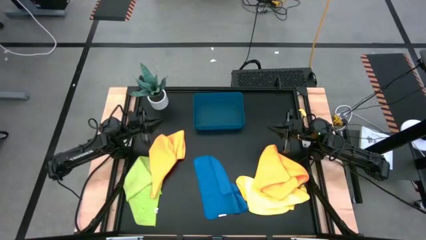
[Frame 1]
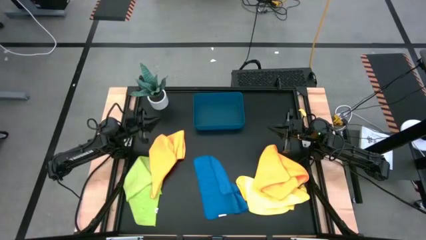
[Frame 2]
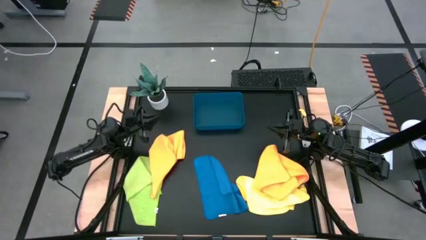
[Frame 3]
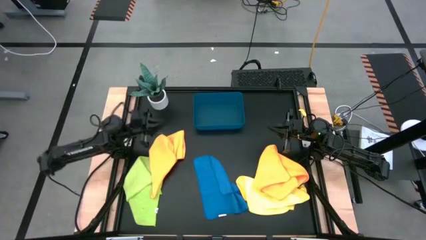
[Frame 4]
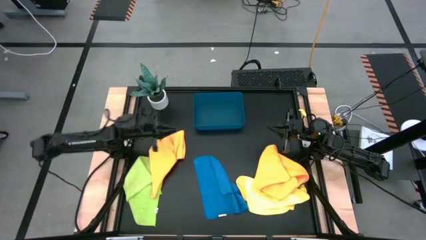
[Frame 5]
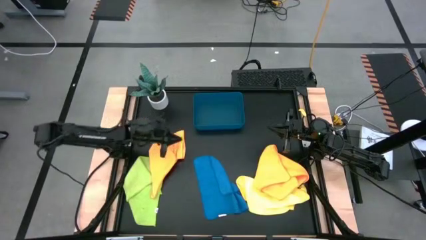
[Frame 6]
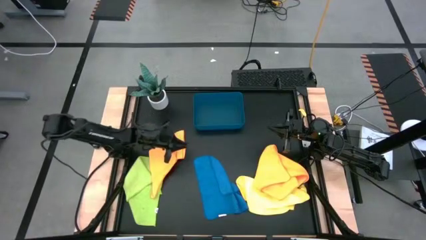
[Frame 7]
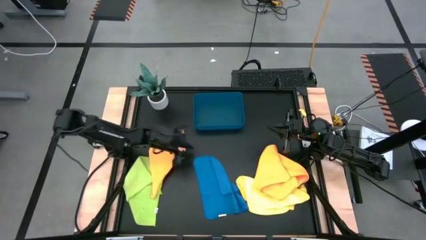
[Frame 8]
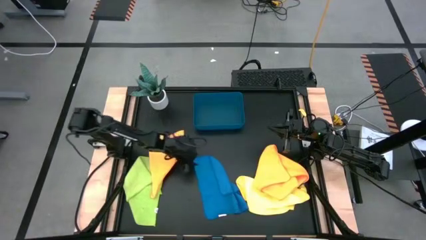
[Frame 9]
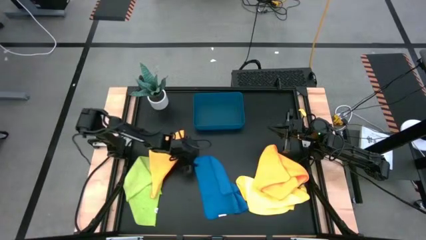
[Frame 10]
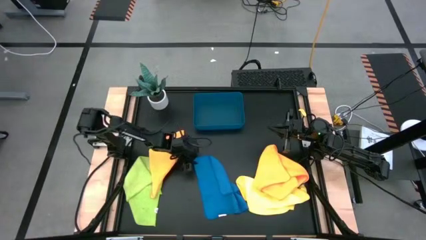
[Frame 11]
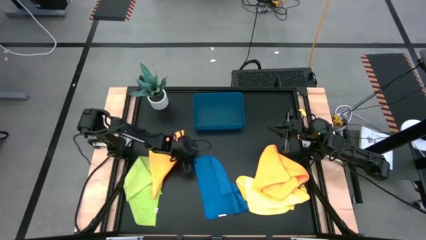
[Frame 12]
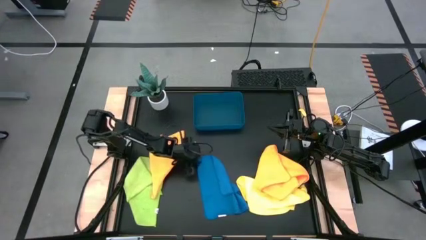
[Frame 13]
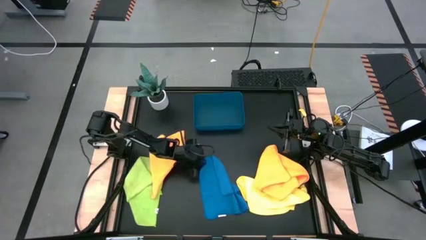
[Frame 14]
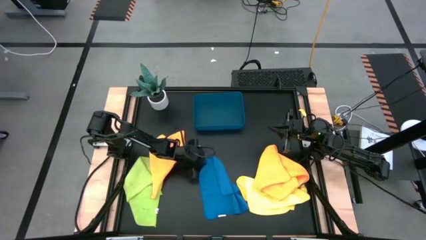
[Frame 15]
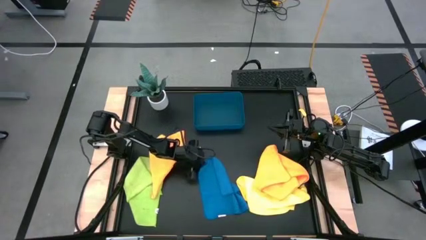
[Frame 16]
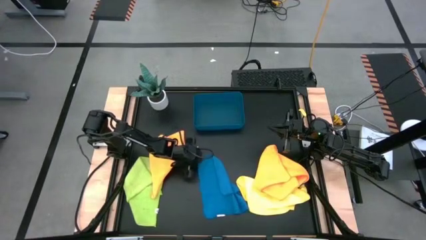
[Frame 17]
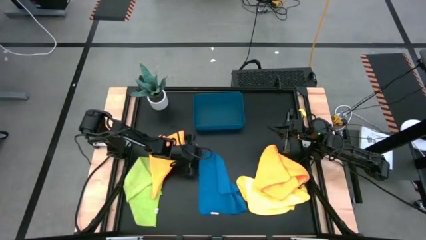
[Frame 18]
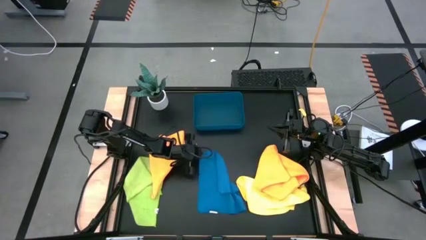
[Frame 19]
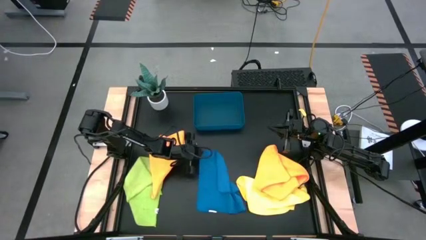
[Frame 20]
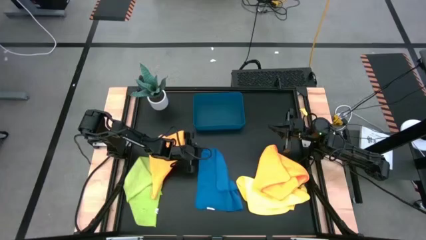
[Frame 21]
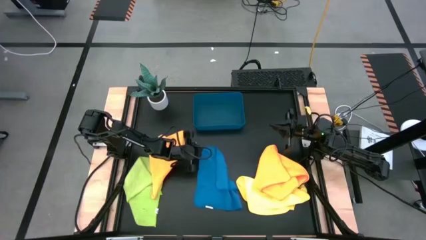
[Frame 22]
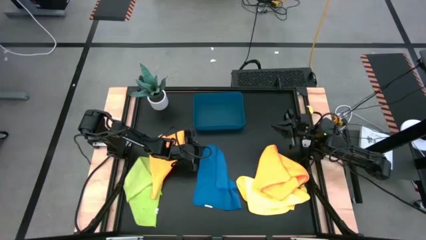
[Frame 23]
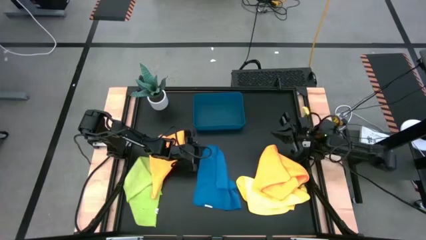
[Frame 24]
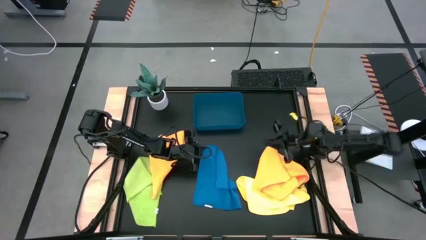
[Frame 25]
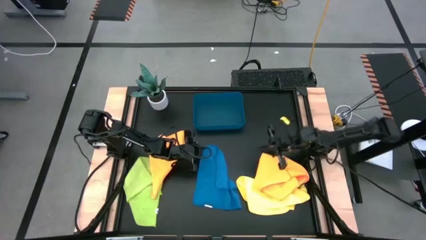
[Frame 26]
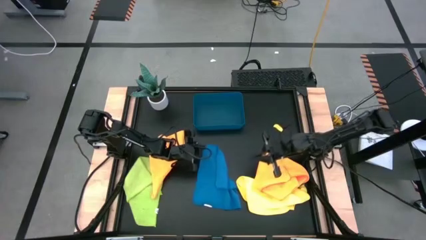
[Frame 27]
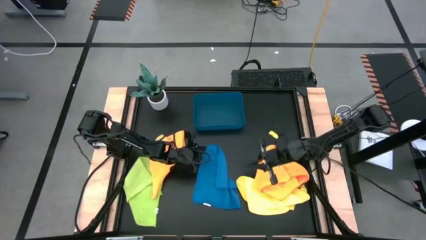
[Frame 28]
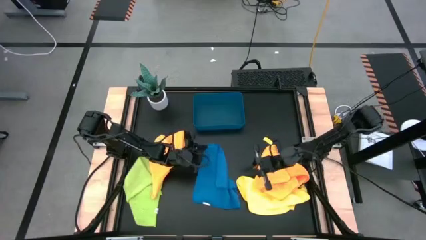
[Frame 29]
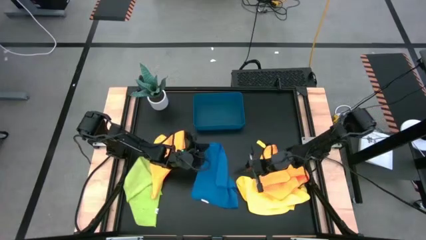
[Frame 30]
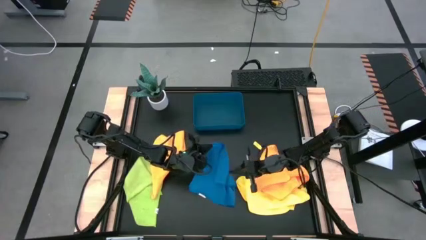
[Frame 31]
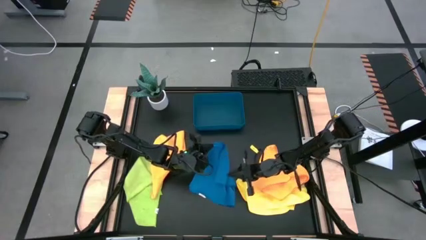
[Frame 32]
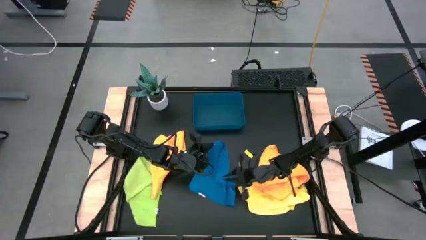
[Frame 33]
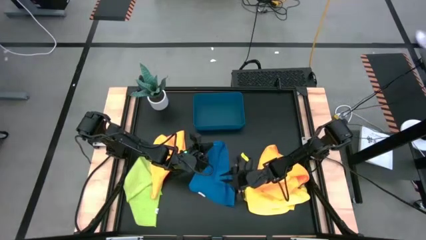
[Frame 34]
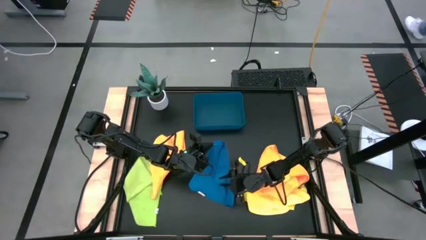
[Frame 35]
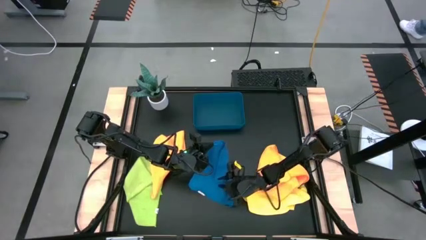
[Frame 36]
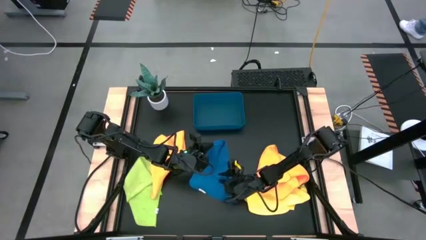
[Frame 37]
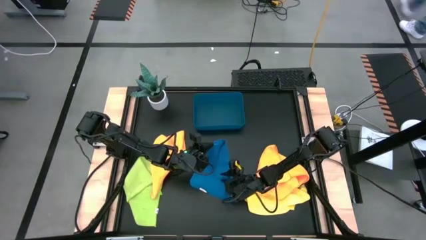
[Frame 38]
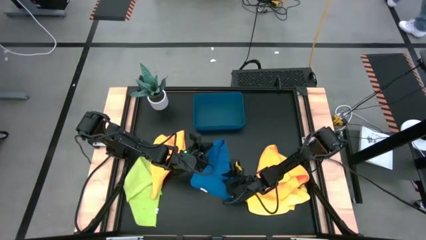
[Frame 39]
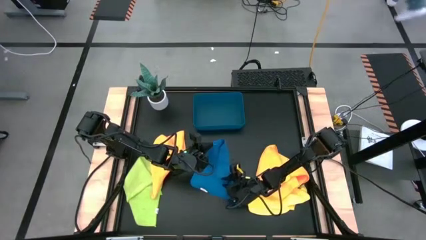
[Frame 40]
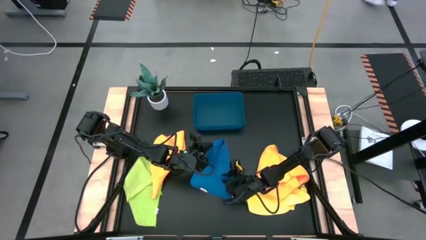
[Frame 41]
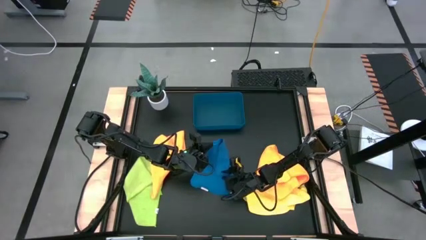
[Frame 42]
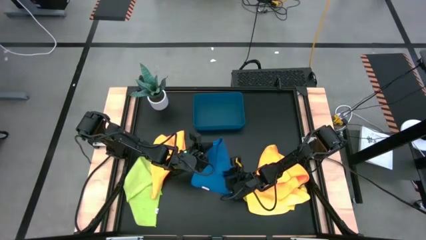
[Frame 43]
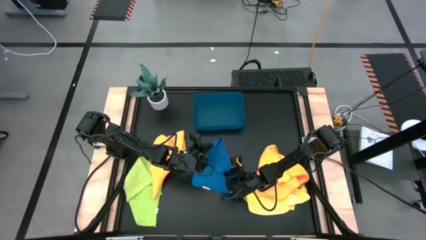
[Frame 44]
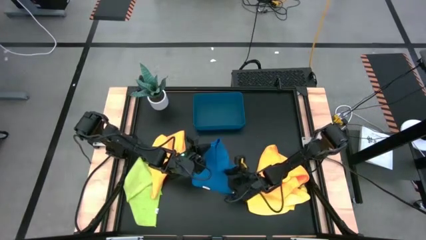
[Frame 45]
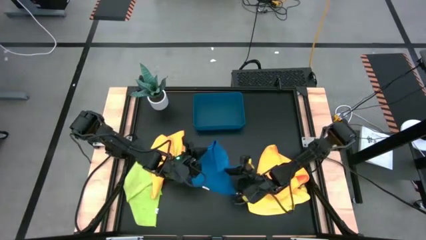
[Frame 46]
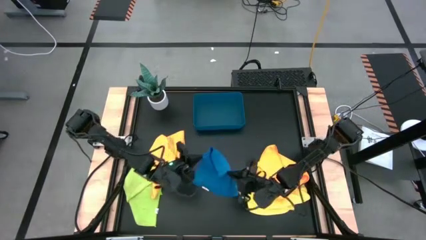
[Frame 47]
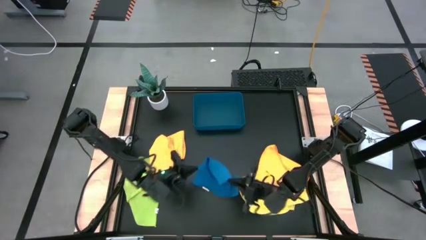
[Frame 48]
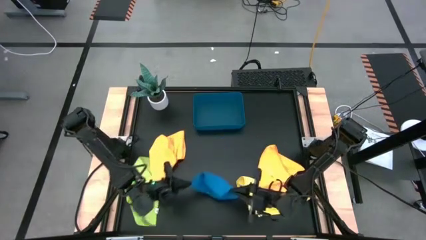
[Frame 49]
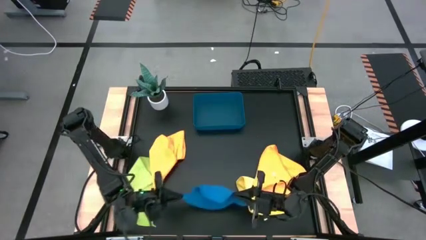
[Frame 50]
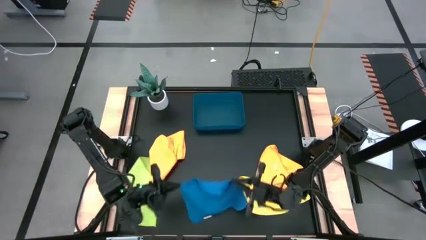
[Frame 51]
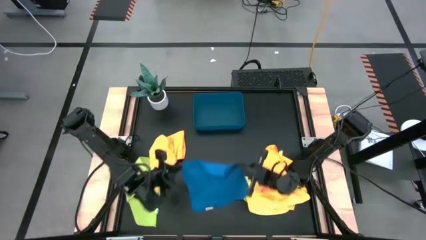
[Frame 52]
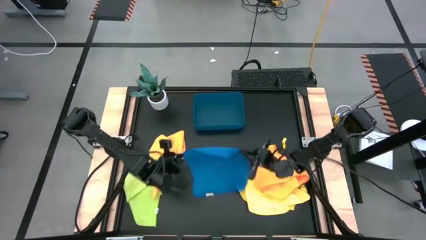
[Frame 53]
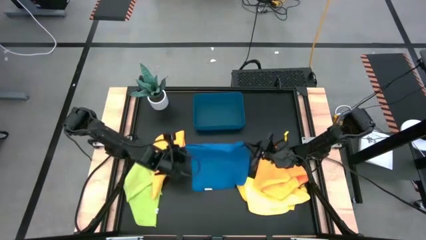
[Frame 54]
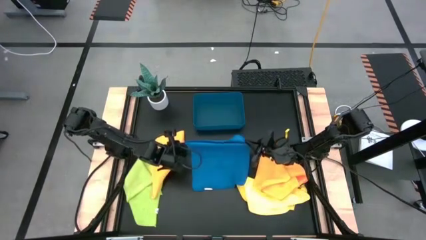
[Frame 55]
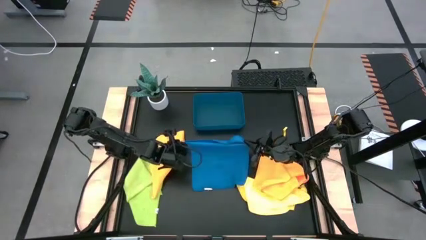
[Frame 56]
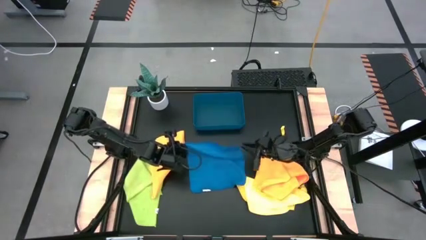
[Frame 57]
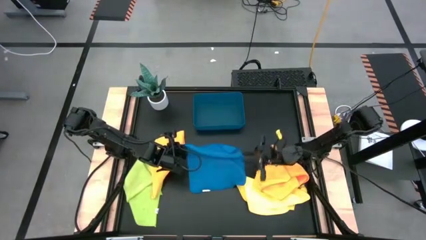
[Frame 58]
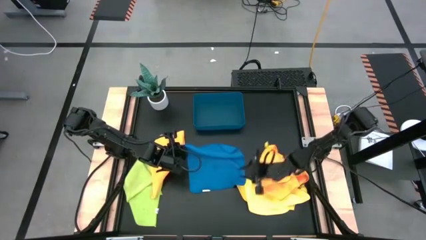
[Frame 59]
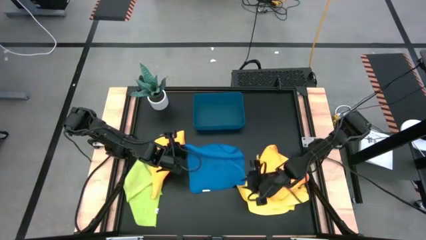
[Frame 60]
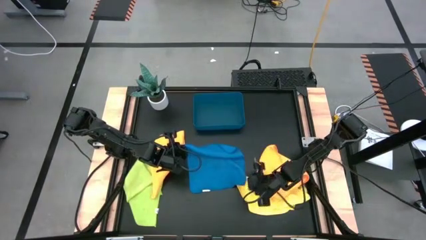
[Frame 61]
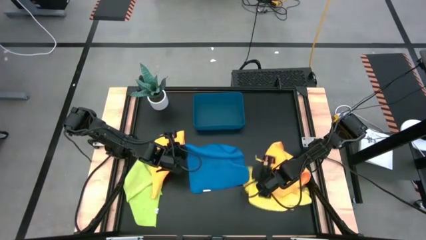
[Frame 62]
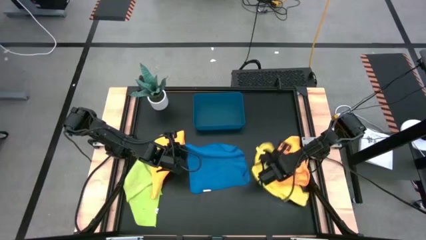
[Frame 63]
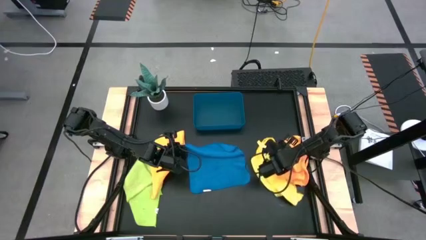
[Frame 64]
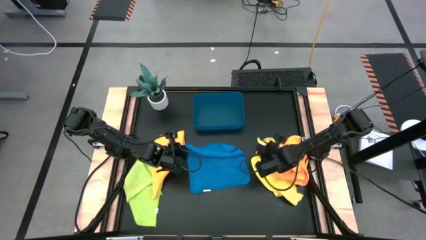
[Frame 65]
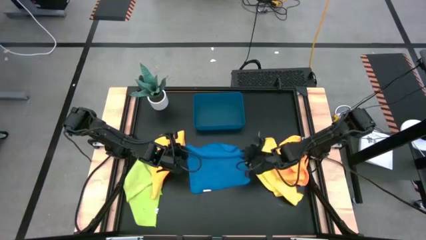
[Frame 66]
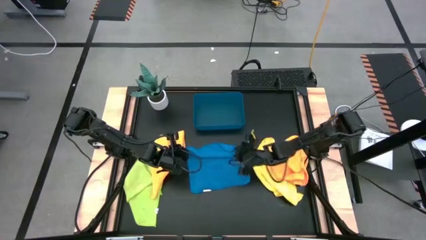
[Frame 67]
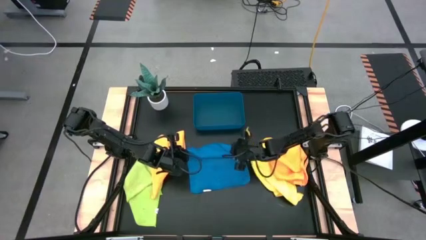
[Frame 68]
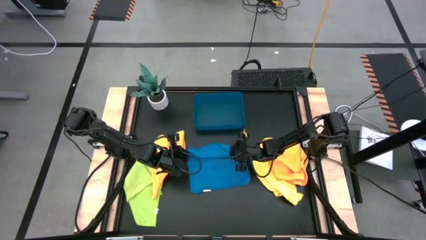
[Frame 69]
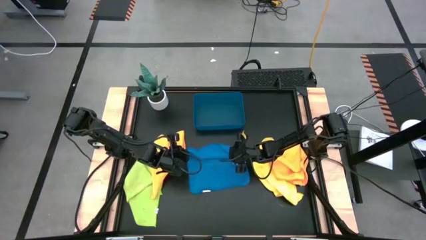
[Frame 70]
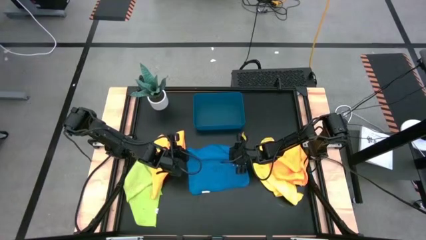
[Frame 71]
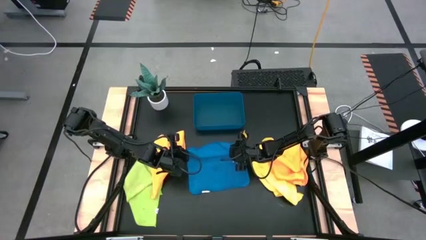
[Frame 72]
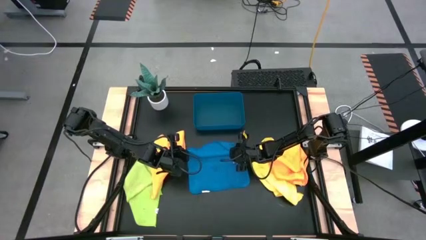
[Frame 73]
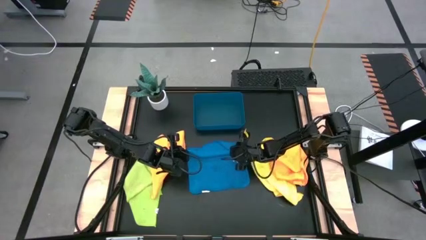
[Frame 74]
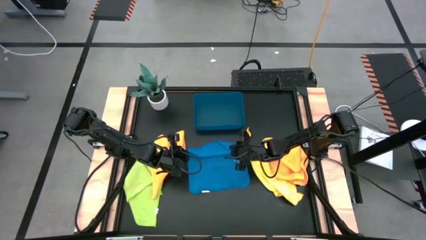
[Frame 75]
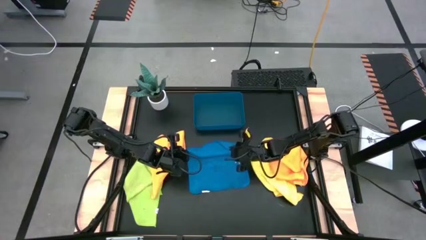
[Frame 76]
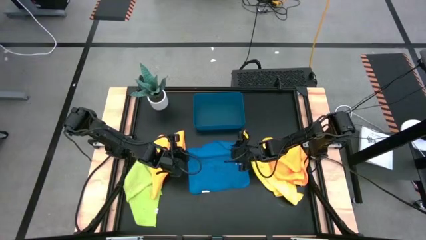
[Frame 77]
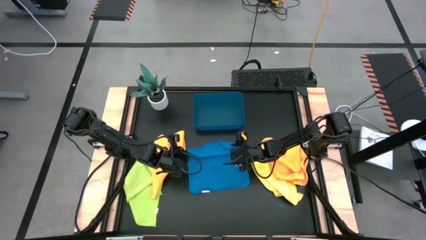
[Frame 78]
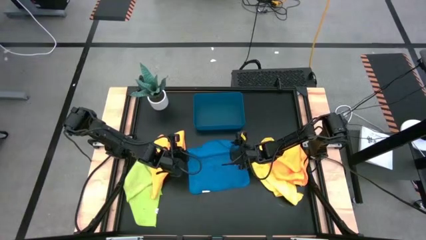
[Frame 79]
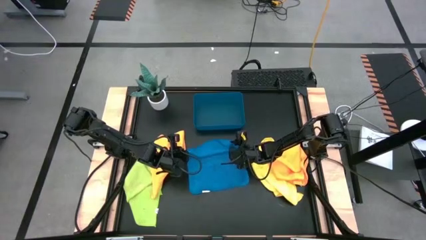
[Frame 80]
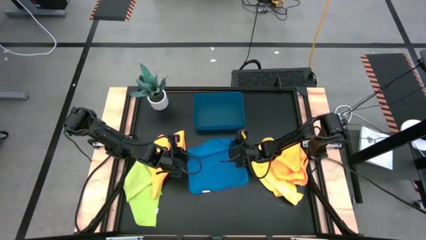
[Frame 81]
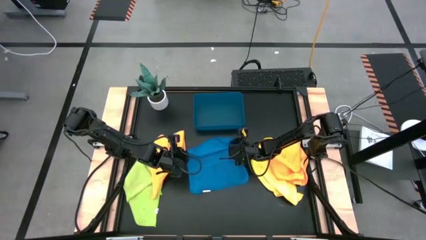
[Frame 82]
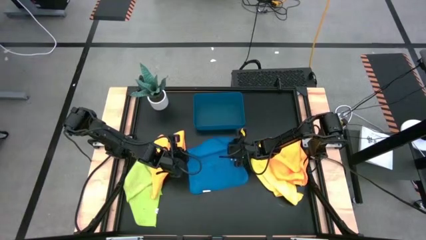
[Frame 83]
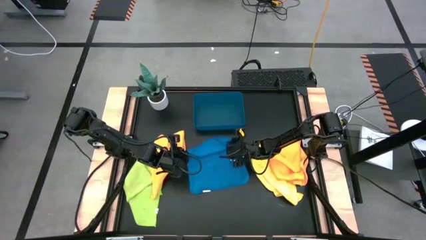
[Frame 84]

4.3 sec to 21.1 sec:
Task: Fold microfiber towels
Fold the blue microfiber cloth
